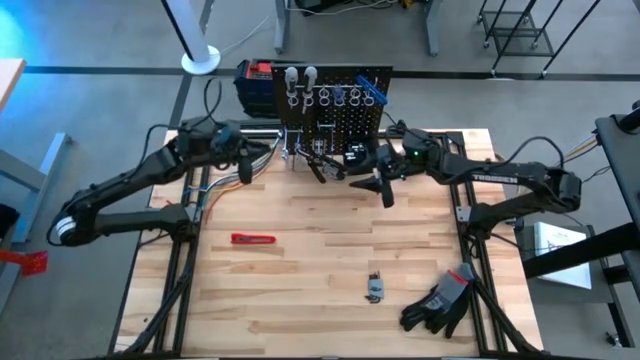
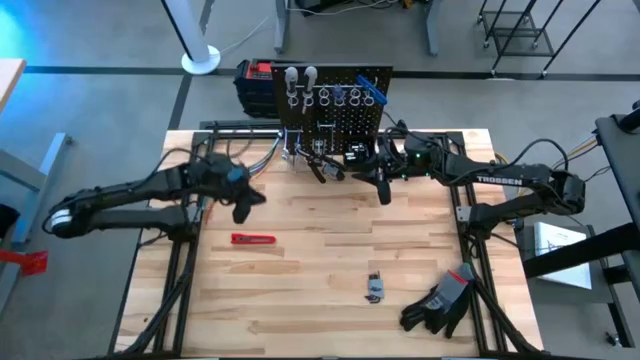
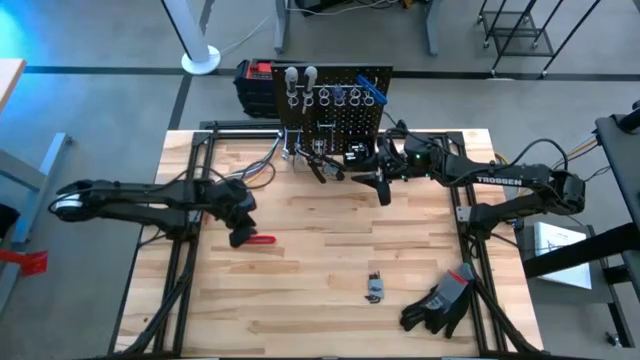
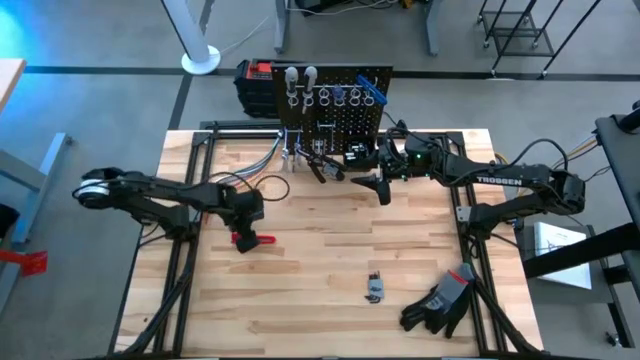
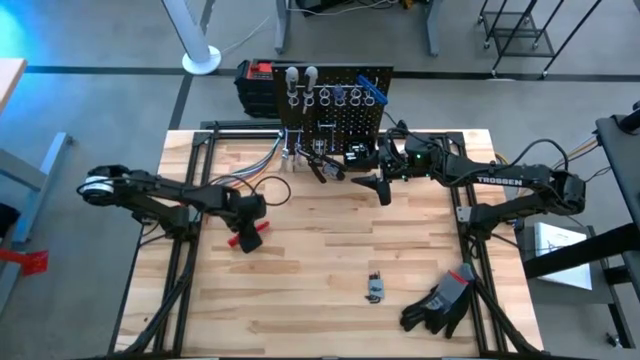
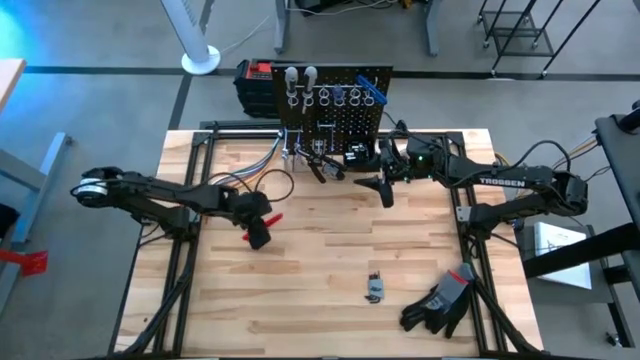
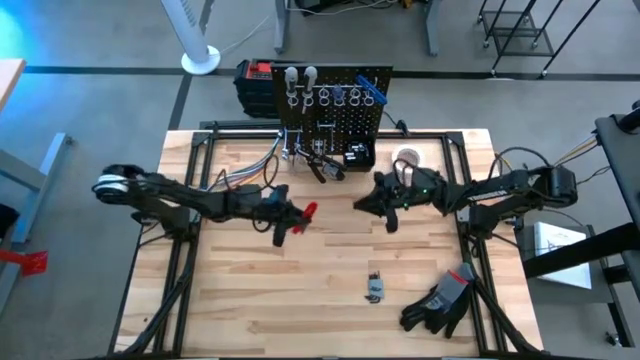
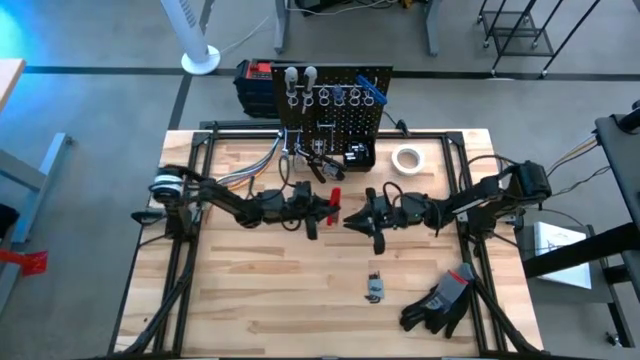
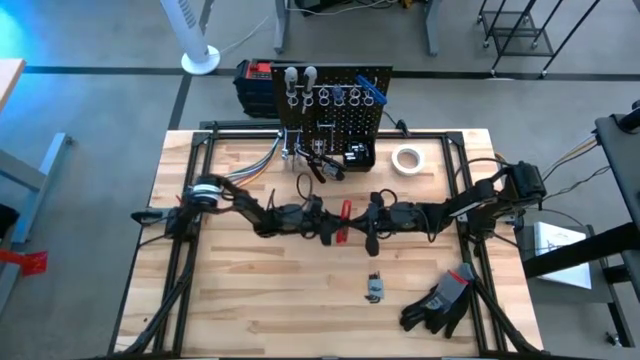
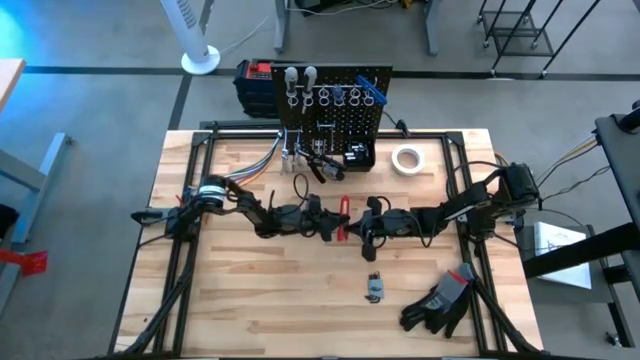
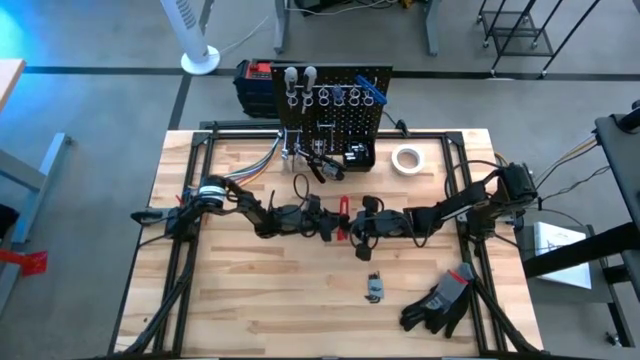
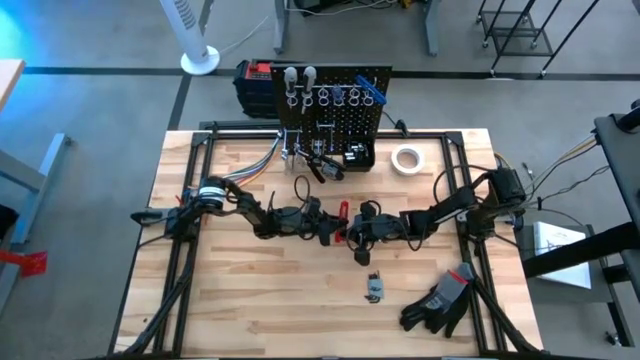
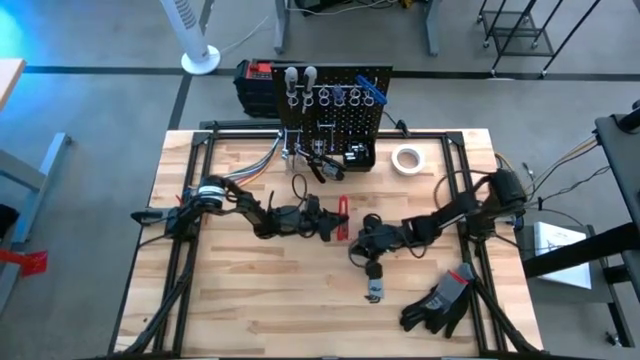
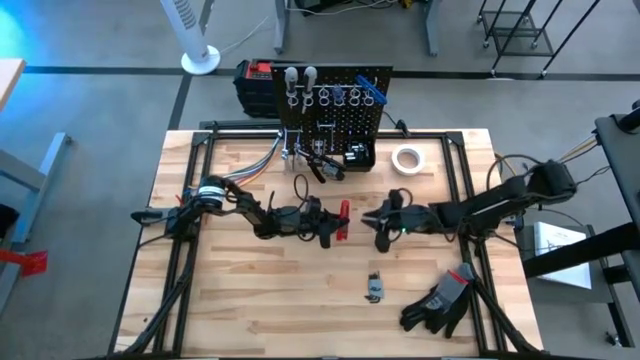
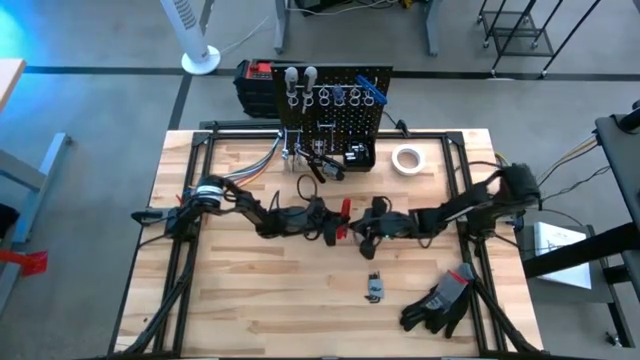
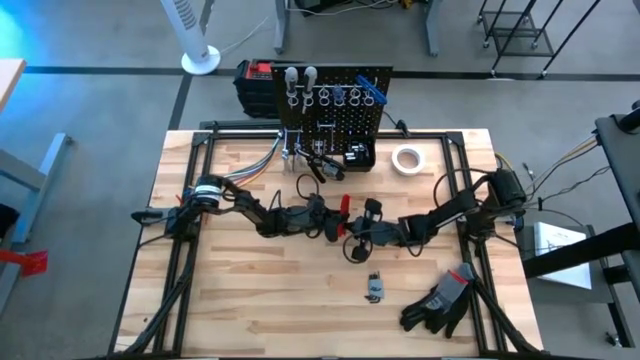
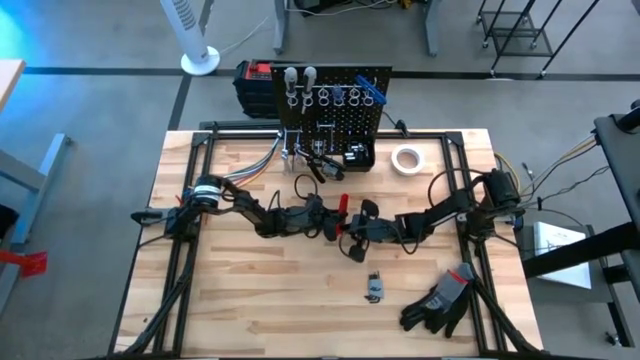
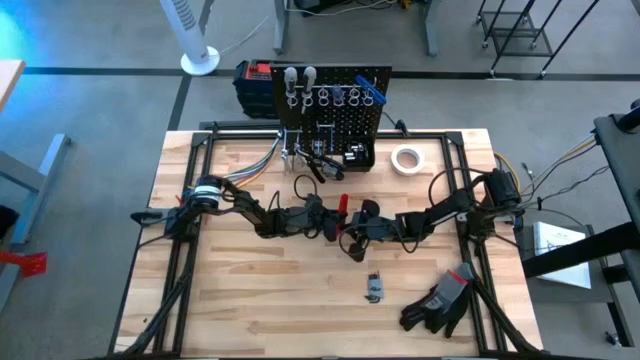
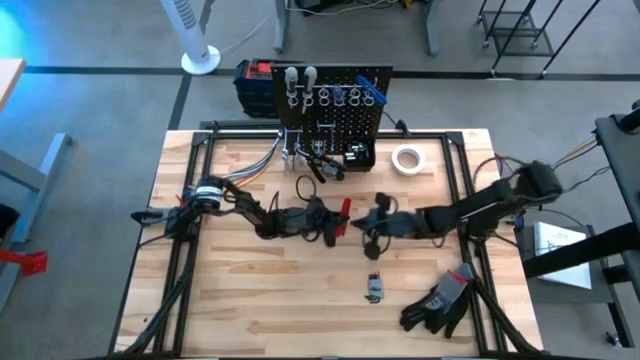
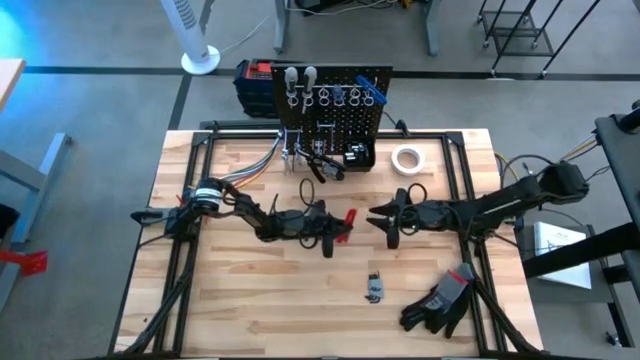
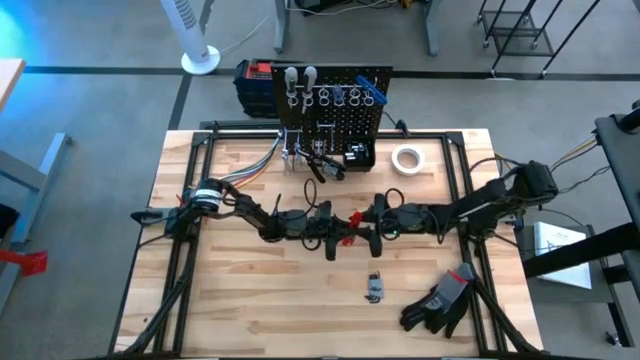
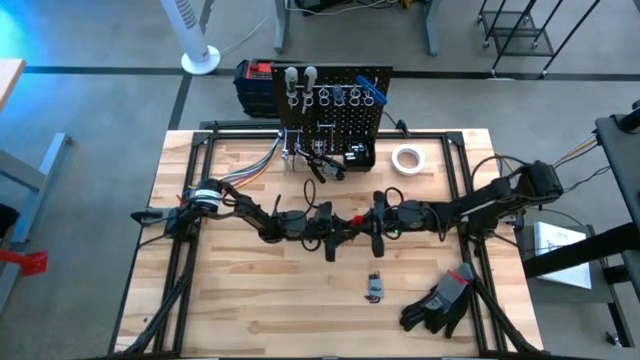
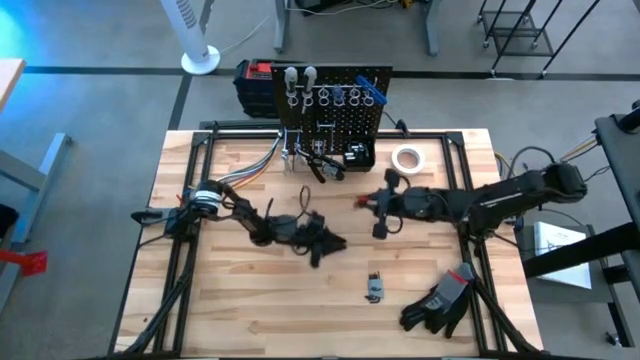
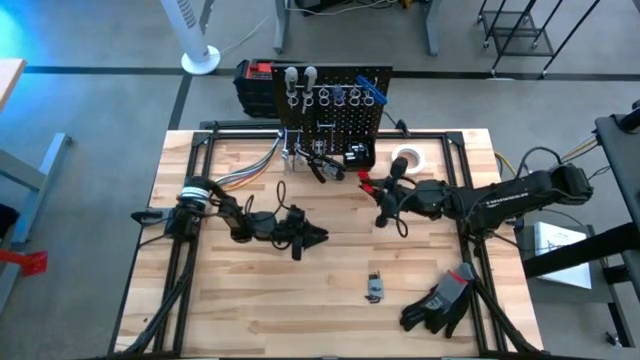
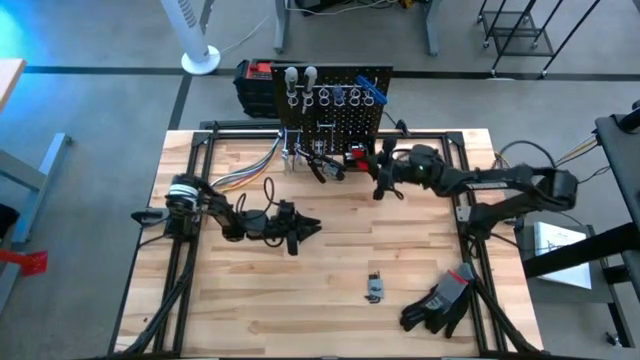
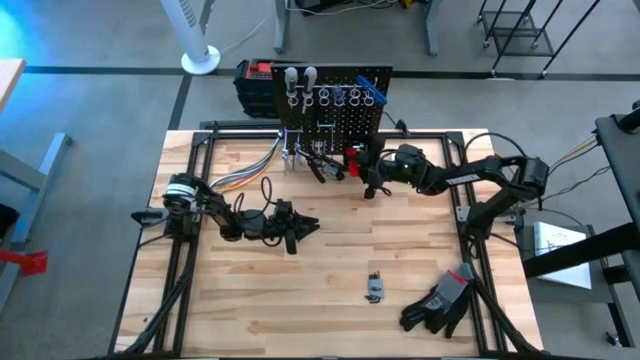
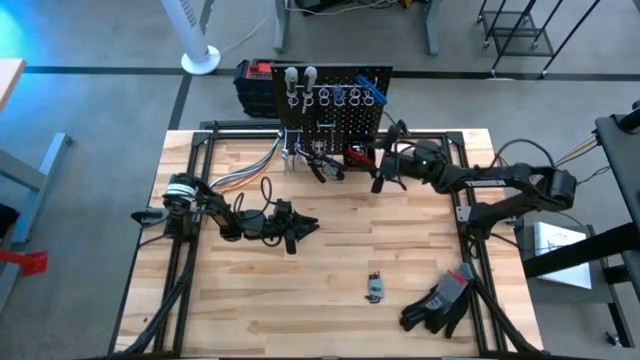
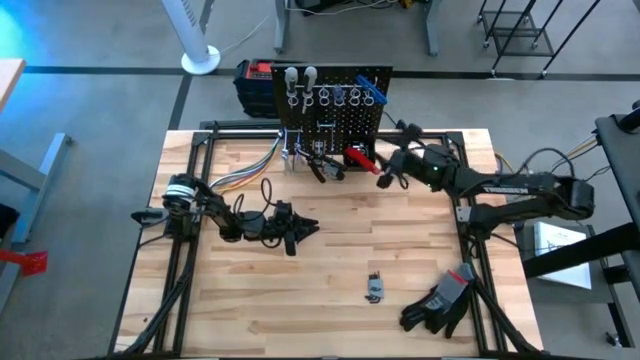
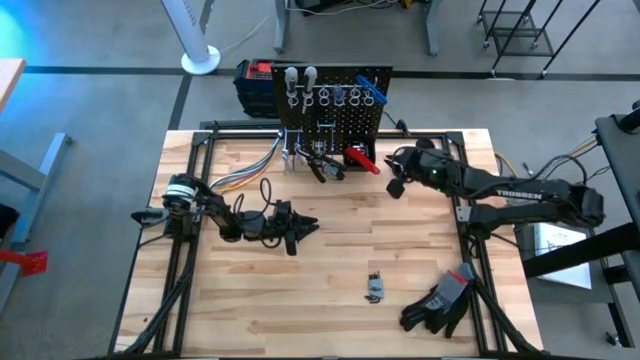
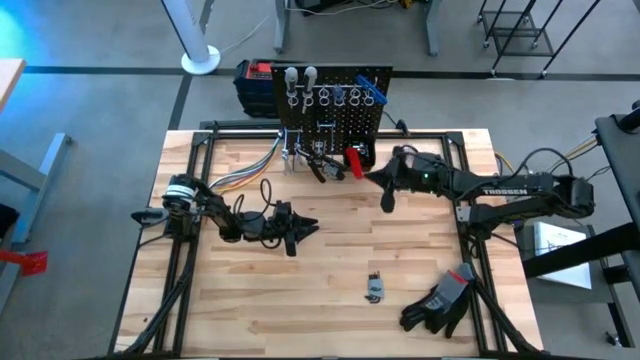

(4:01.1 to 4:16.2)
Task: Hang tools onto peg board
Put the red cutter into the black tool bin on the peg board

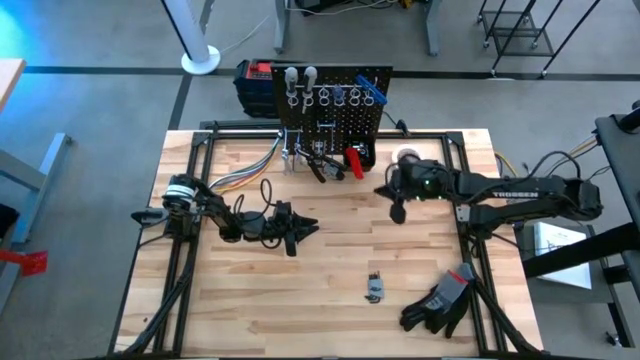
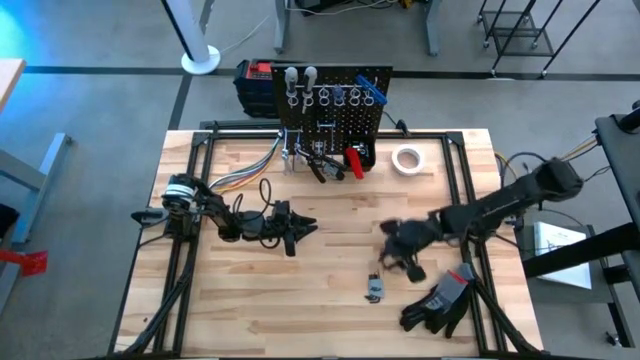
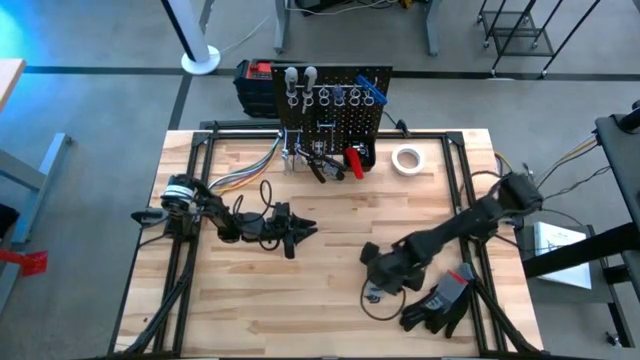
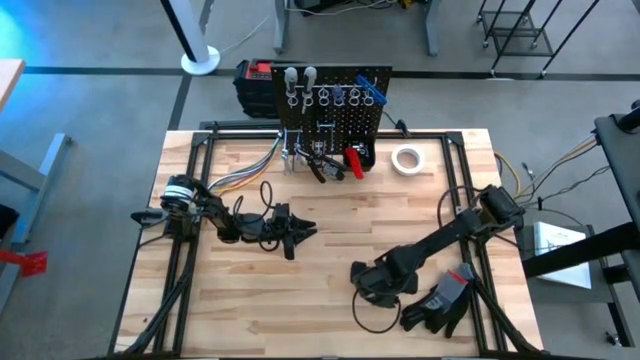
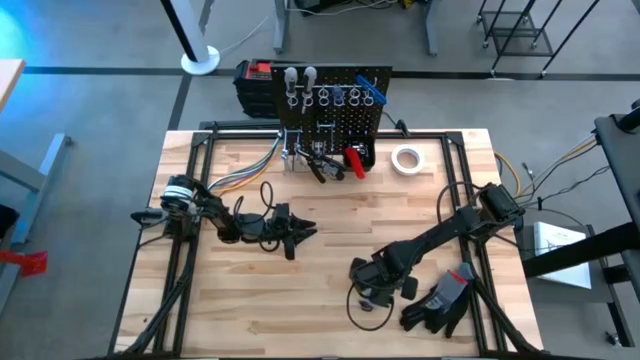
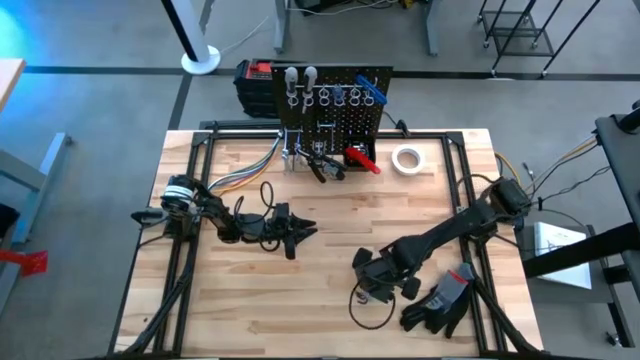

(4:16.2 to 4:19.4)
Put the black hex key set into the black tool bin on the peg board

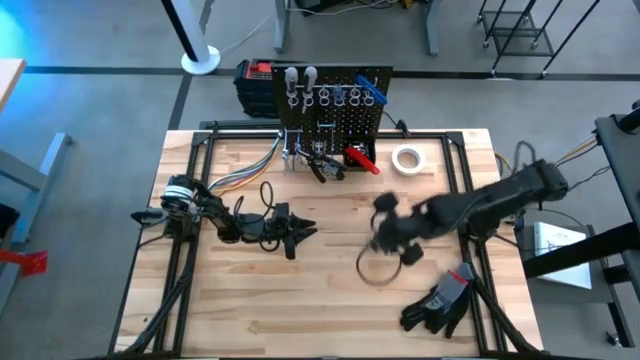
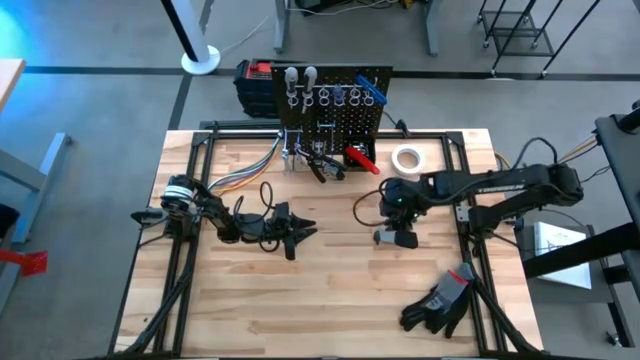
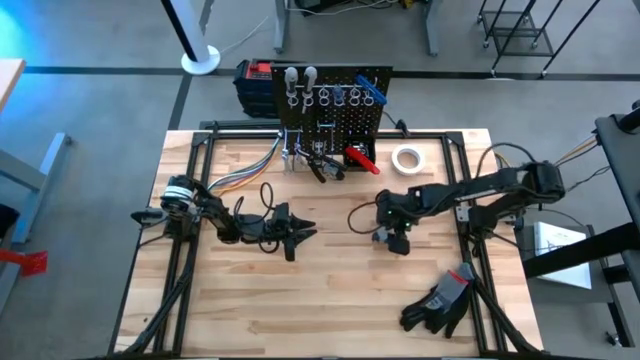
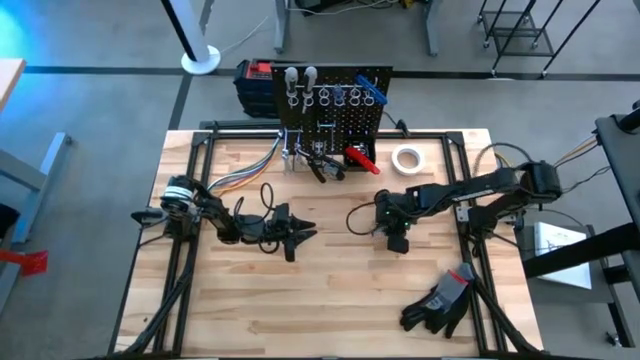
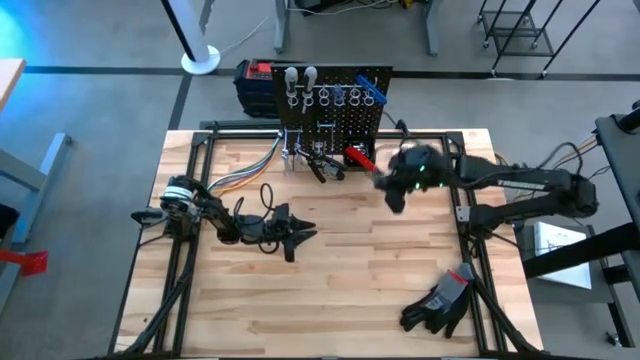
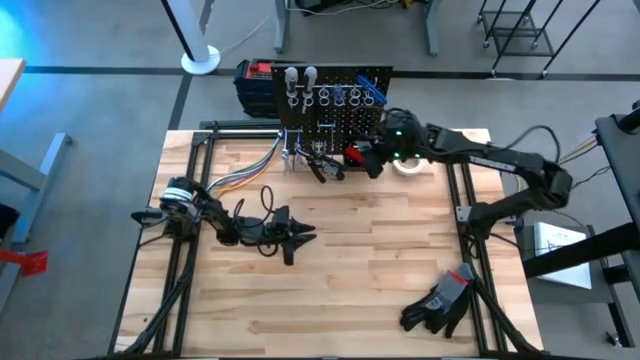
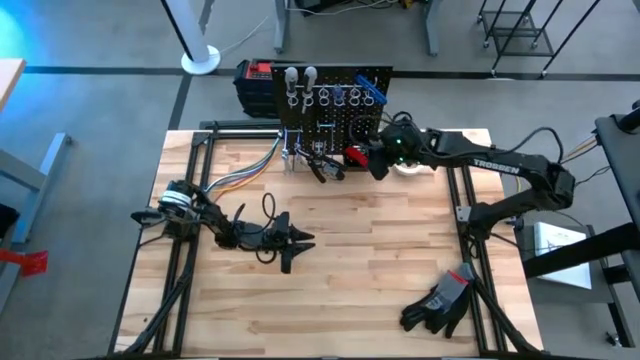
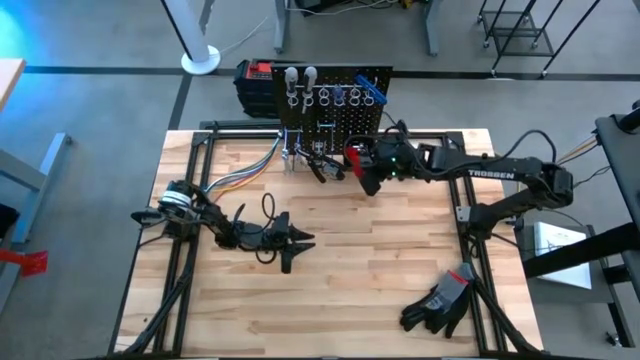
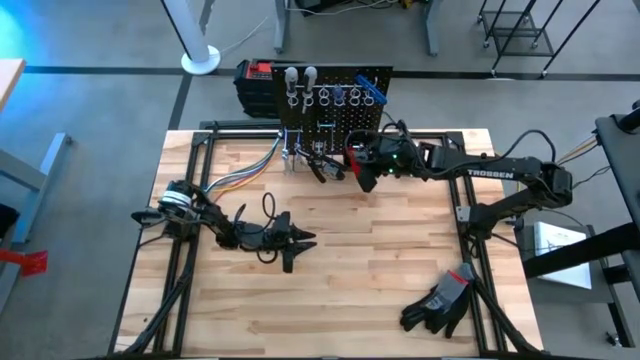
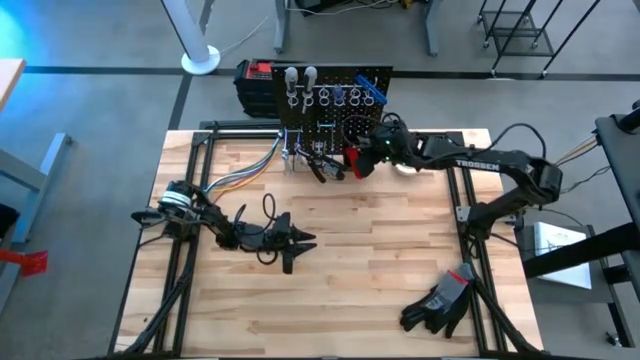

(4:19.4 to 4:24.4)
Put the black hex key set into the black tool bin on the peg board
